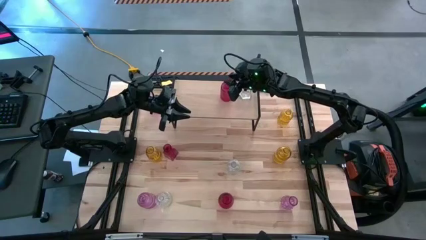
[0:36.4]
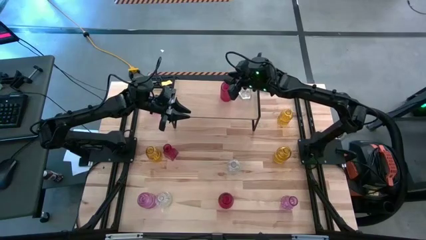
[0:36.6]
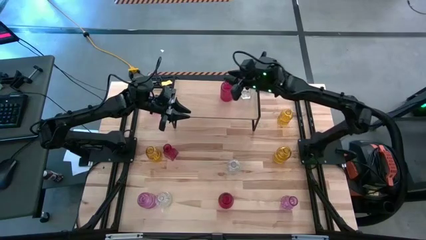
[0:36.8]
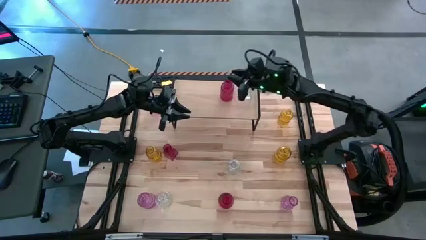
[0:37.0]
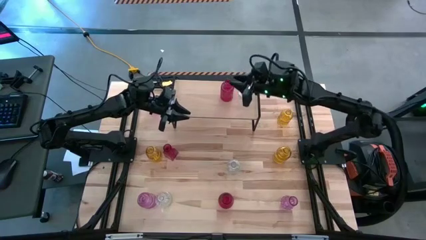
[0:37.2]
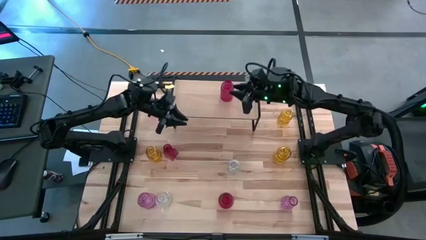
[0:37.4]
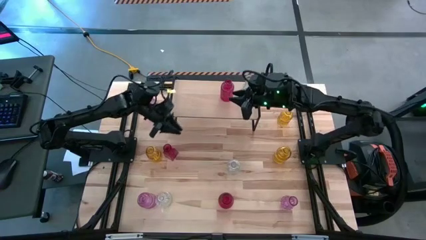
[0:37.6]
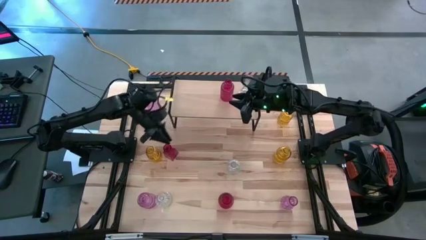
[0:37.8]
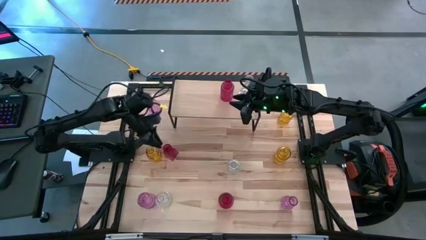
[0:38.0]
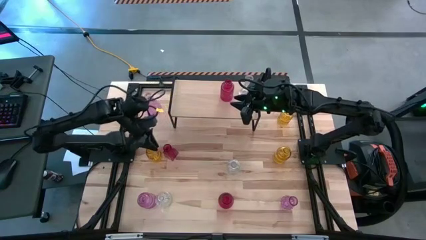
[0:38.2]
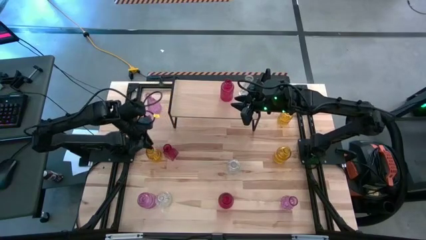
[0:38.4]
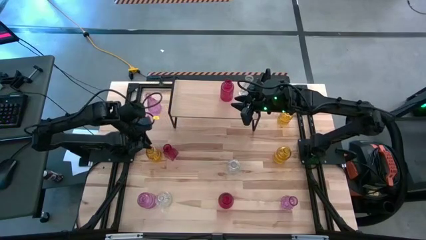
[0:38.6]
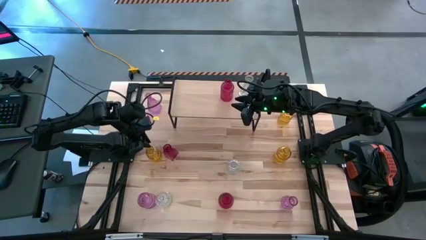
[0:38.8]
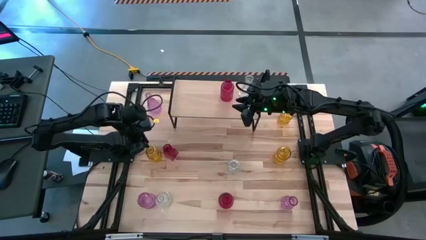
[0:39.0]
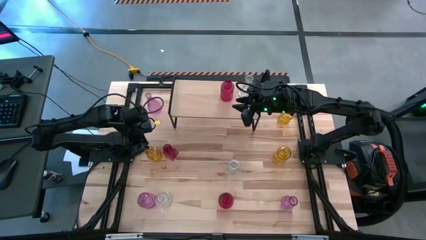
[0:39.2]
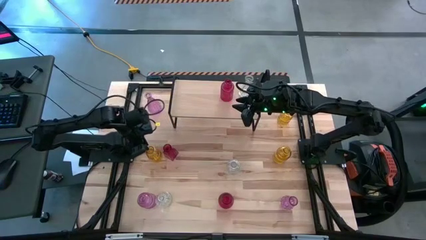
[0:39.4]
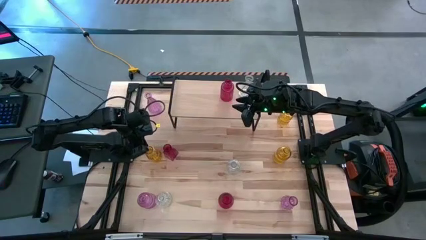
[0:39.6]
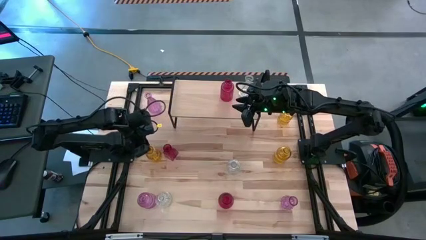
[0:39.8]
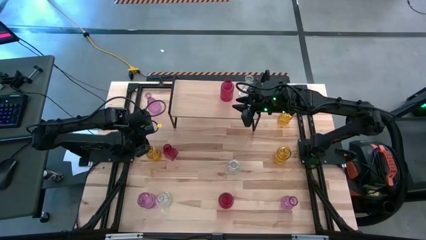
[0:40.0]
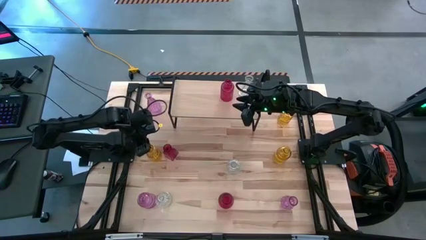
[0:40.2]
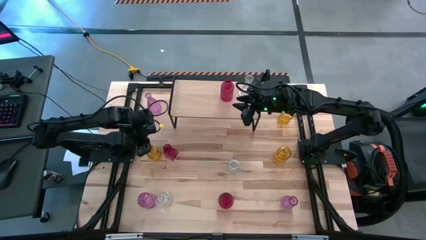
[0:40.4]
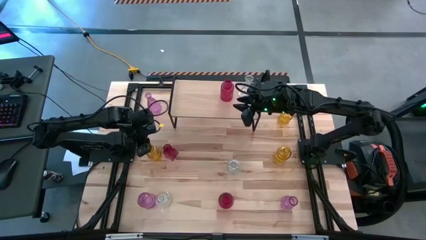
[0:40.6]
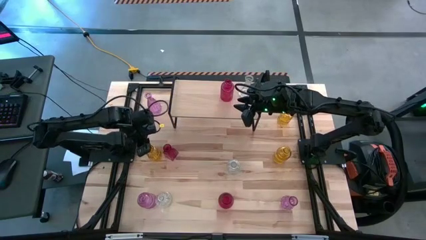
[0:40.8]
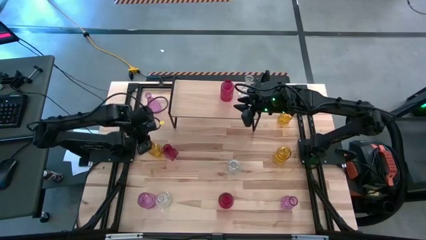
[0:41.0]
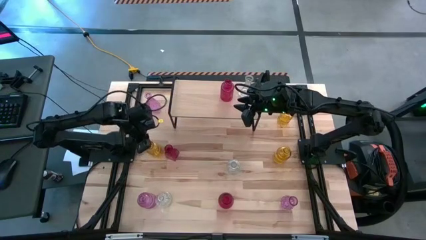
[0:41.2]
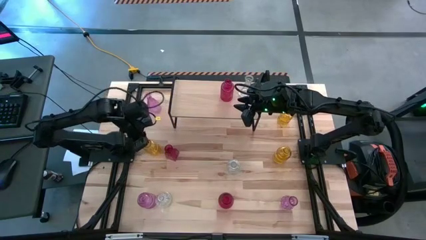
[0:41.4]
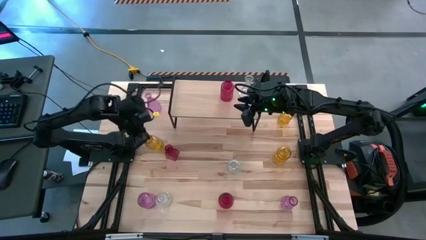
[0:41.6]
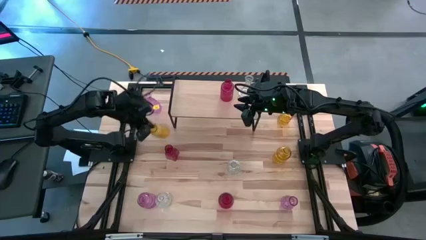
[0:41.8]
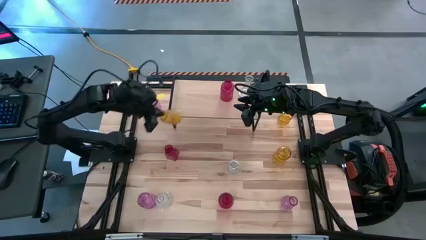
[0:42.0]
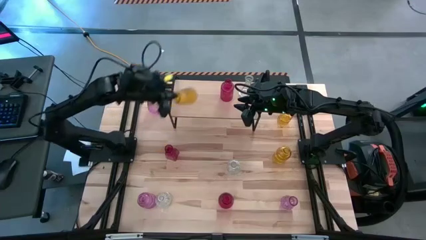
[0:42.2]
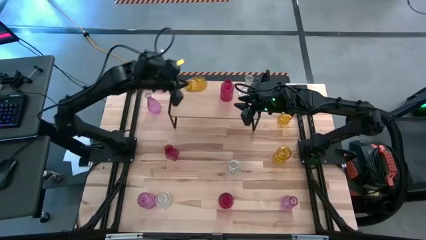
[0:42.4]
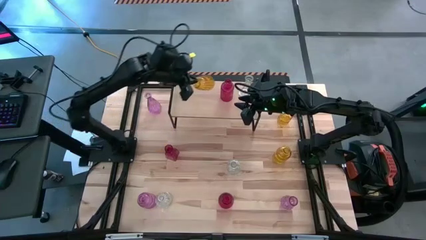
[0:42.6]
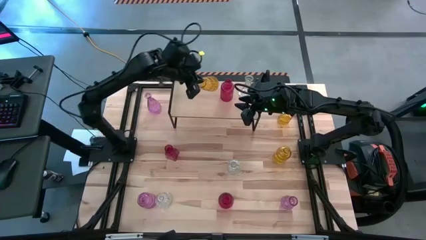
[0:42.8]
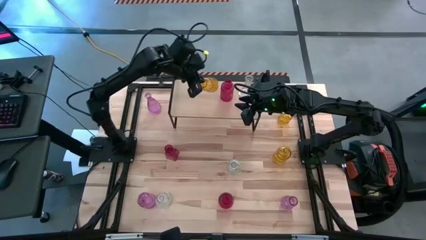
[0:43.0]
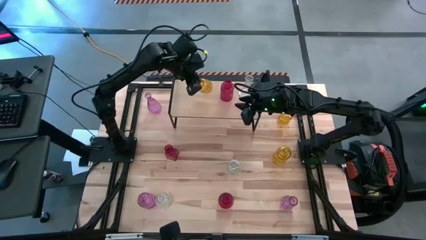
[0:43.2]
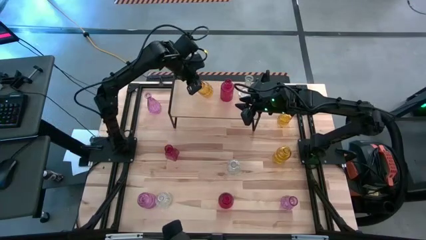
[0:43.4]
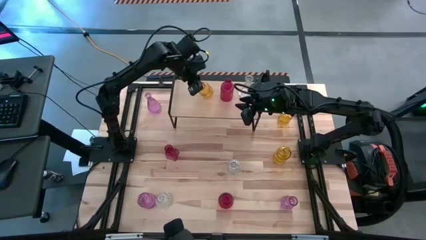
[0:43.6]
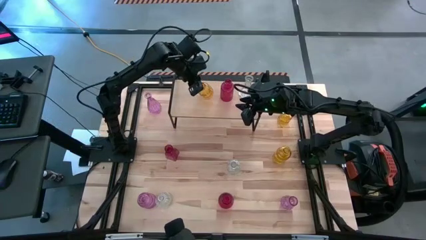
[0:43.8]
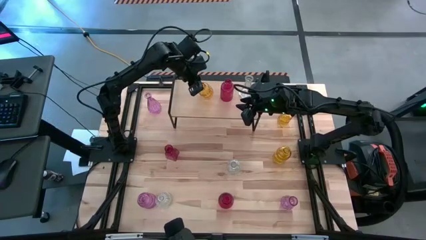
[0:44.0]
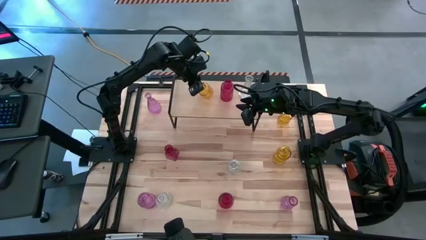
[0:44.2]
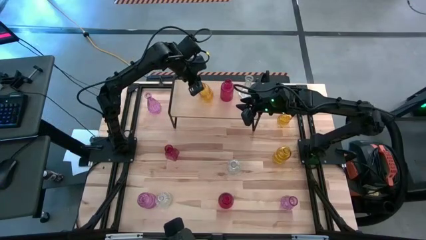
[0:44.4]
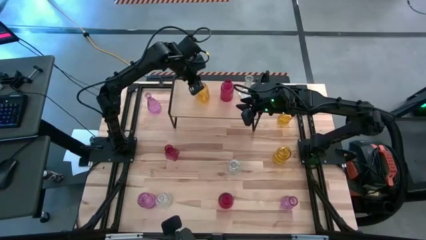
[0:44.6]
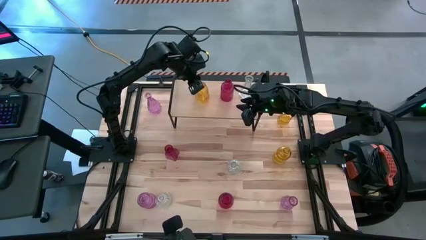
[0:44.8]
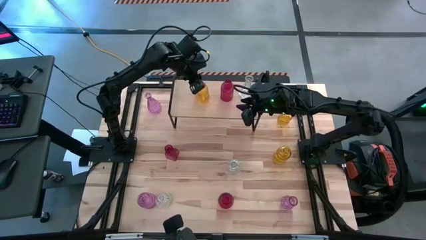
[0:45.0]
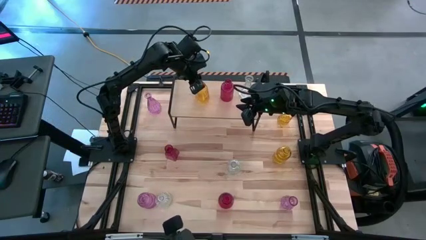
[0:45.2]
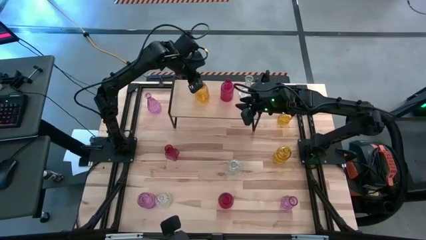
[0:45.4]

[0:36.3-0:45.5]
Task: sort vases onto shelf
Put the bottom left yellow vase on the shelf

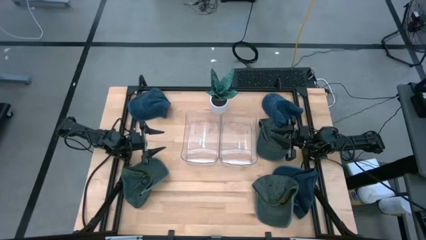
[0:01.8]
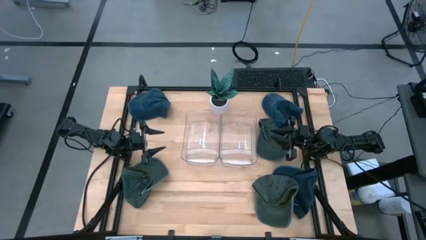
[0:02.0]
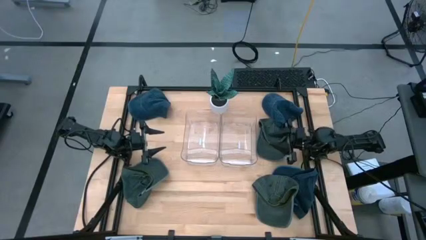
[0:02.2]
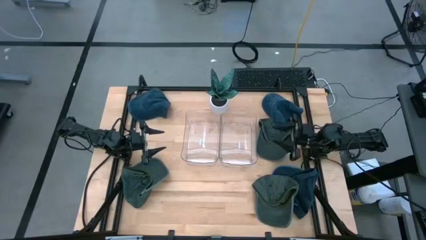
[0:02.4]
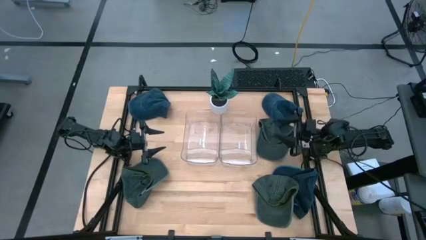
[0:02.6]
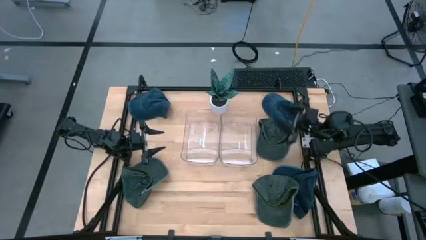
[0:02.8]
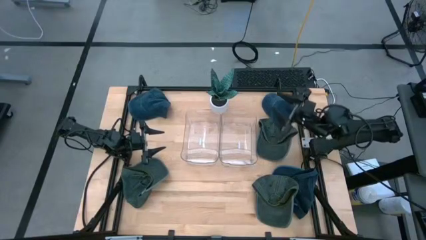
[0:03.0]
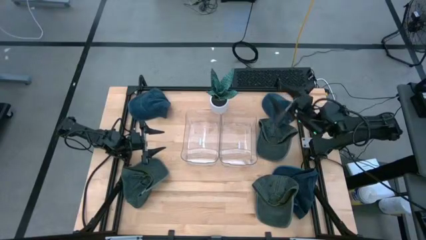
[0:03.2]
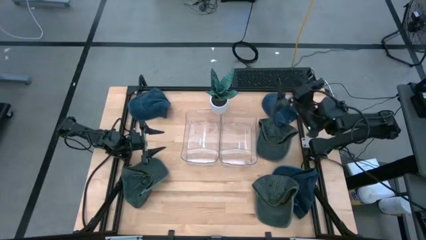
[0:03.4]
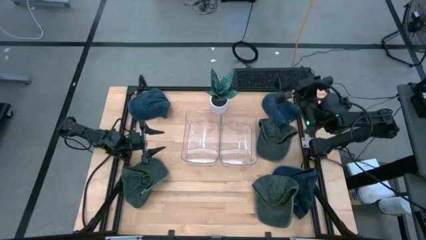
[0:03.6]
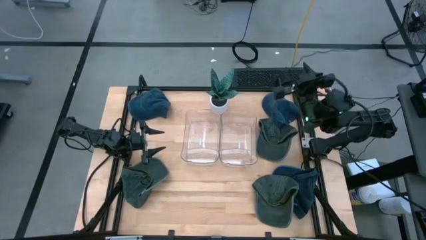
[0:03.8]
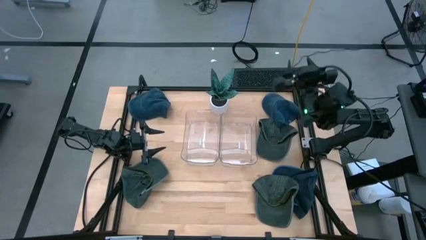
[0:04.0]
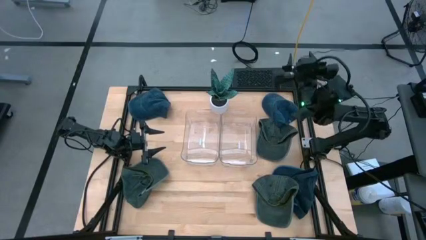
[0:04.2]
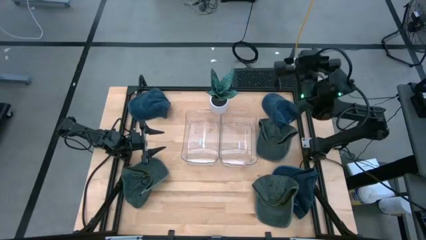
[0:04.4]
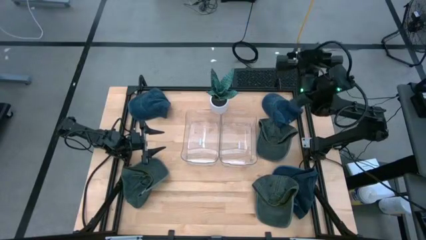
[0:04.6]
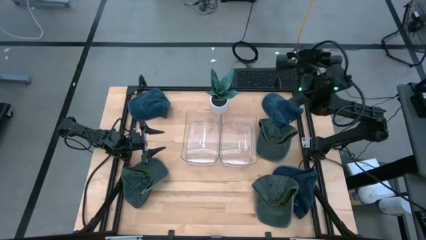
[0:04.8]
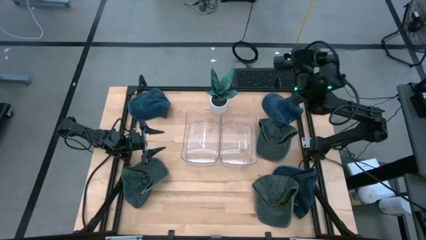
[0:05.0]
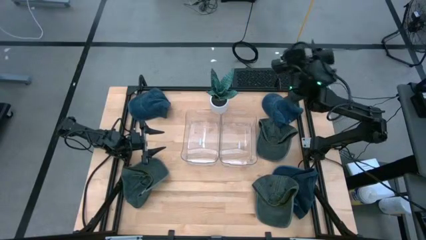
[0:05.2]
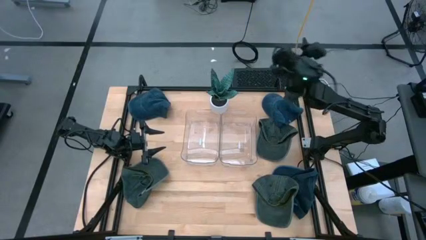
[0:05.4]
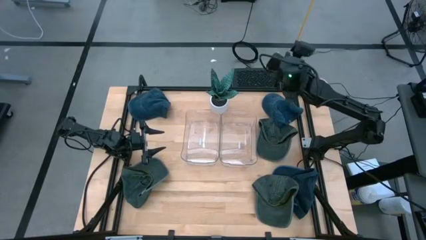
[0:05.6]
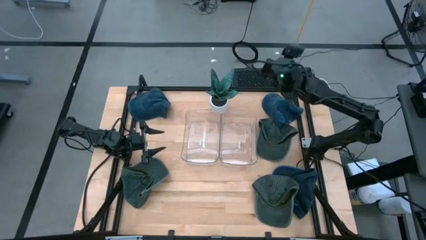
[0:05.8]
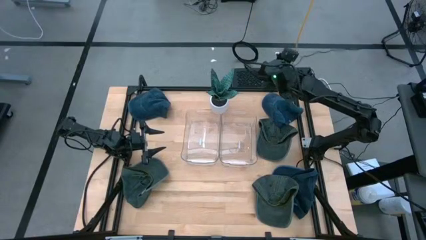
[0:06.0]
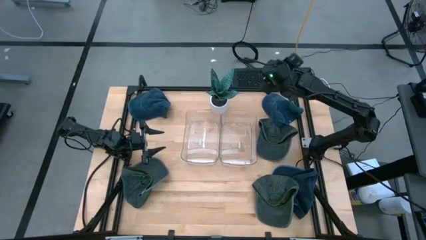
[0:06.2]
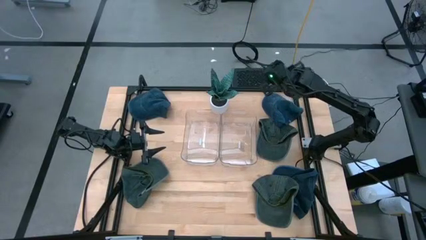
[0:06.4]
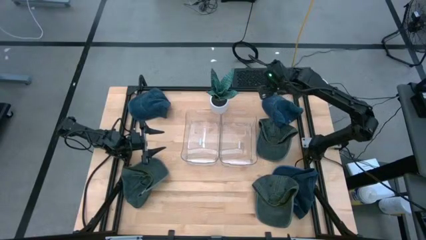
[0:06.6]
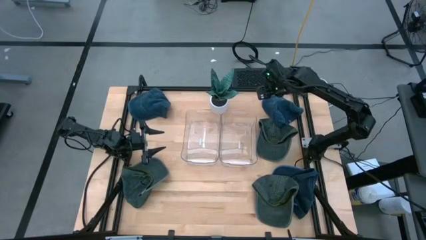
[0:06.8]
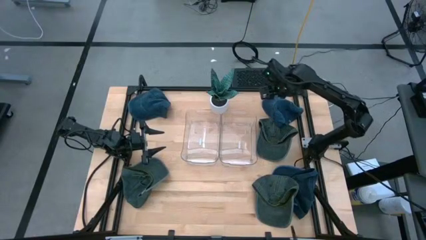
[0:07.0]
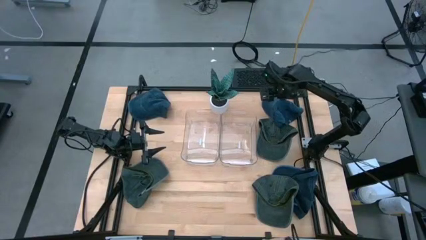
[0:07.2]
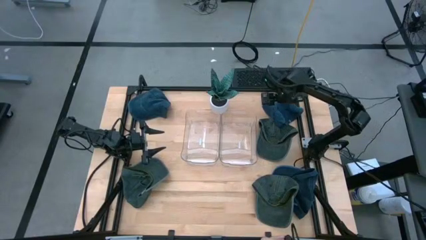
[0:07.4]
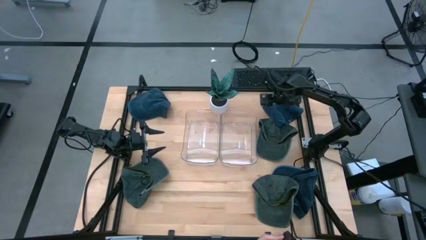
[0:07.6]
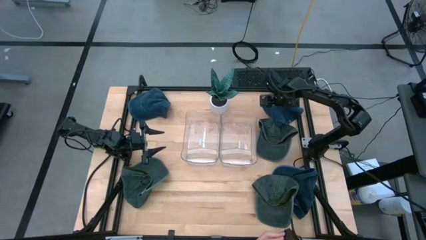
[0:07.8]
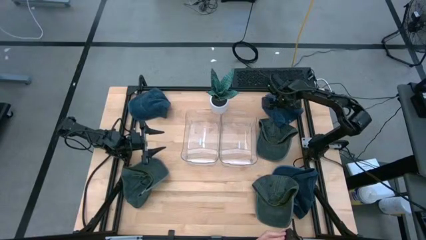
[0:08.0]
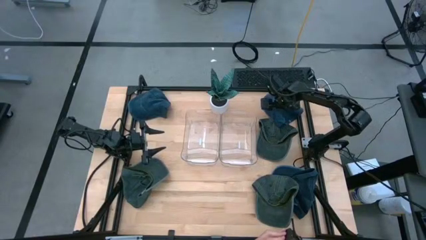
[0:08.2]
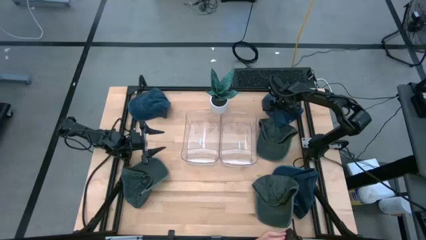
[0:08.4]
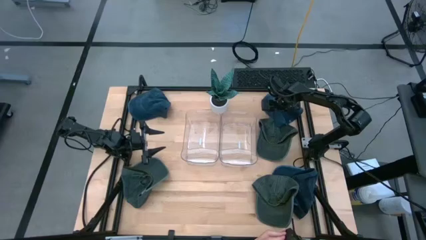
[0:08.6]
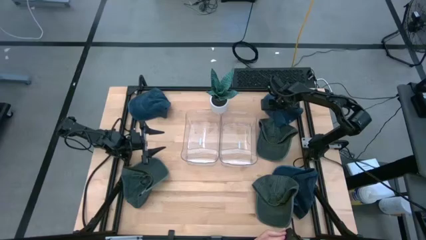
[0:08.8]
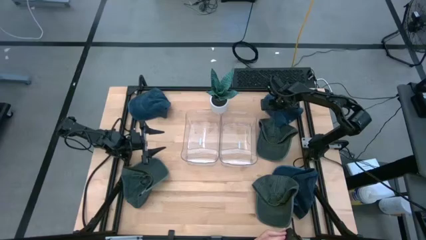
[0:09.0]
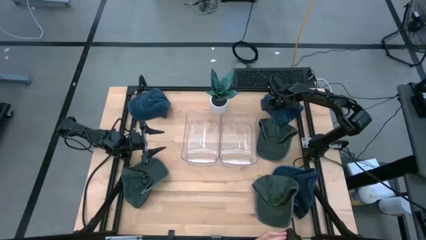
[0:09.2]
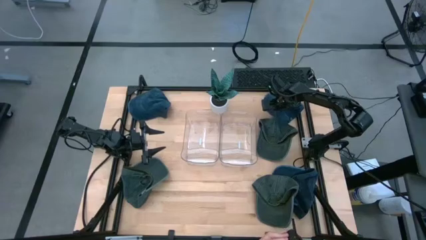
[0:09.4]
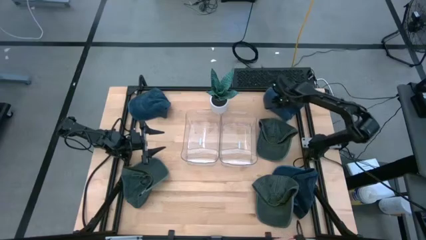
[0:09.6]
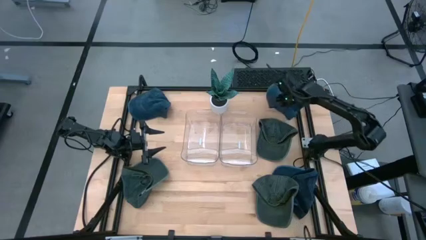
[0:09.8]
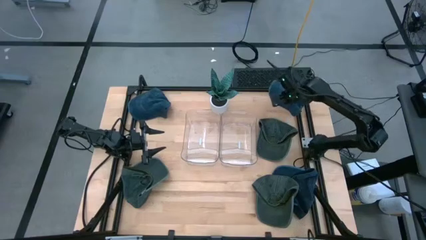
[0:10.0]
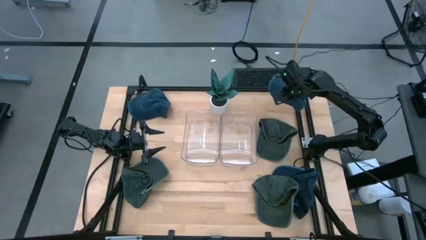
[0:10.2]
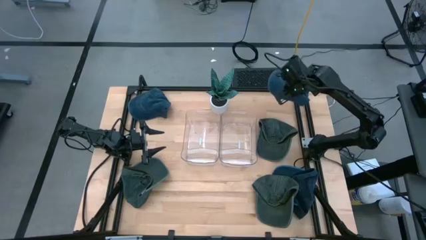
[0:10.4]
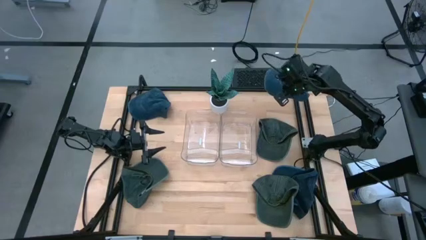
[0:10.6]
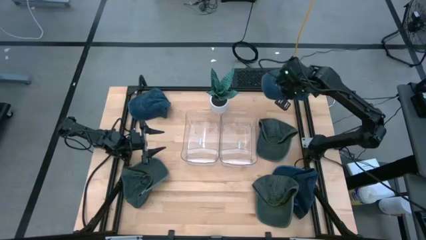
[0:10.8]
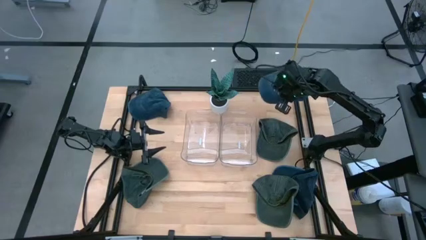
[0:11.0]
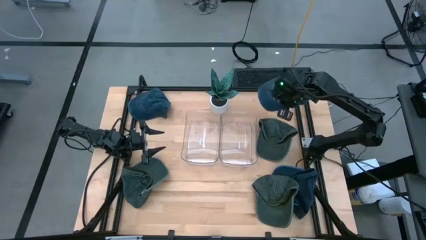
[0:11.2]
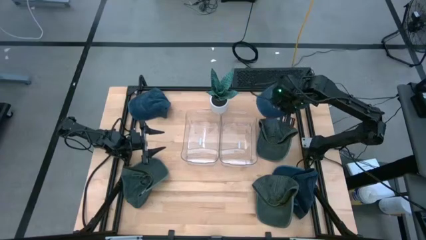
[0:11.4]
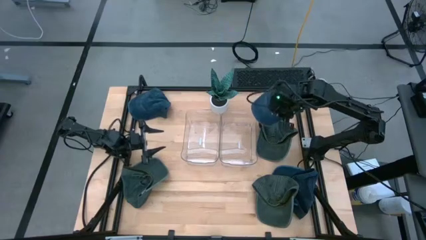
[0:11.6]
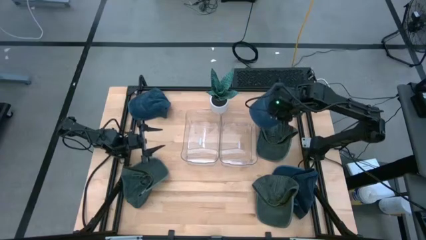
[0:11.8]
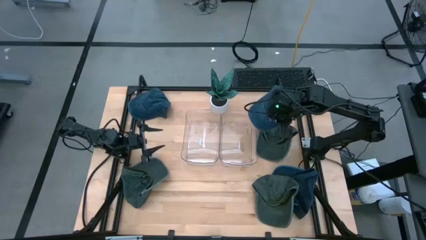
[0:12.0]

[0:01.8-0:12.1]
Task: Pick & Place hat
Put the top right blue cap into the left transparent bin
